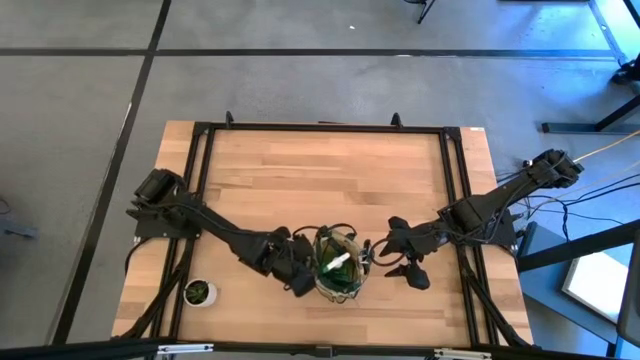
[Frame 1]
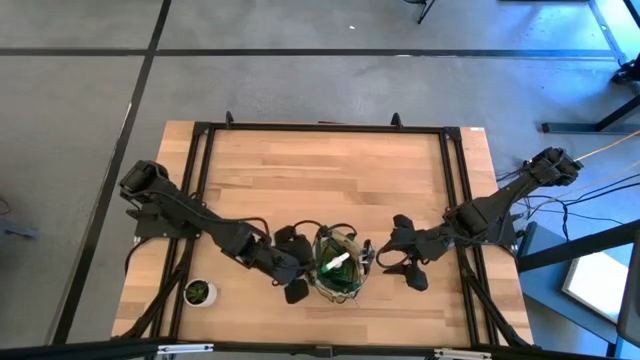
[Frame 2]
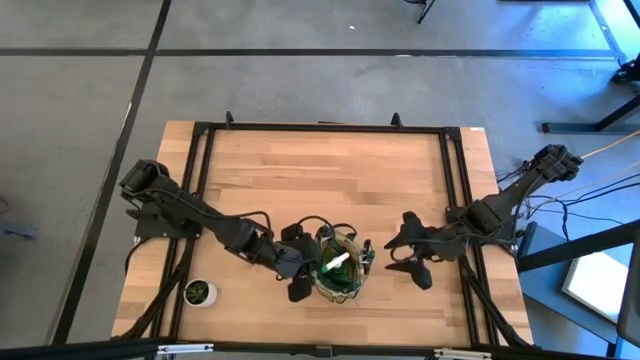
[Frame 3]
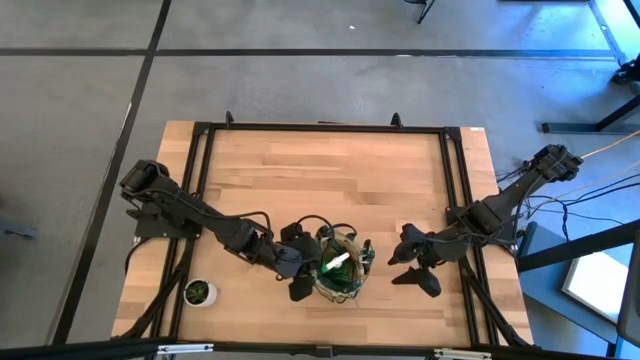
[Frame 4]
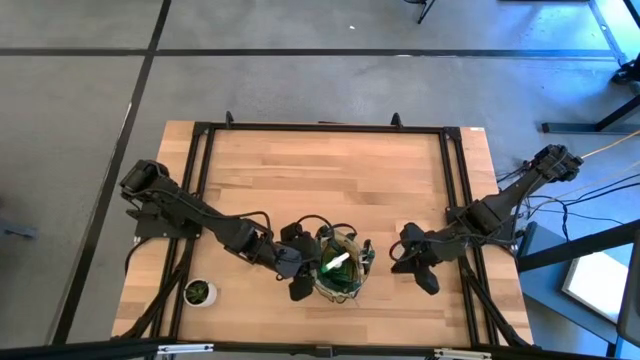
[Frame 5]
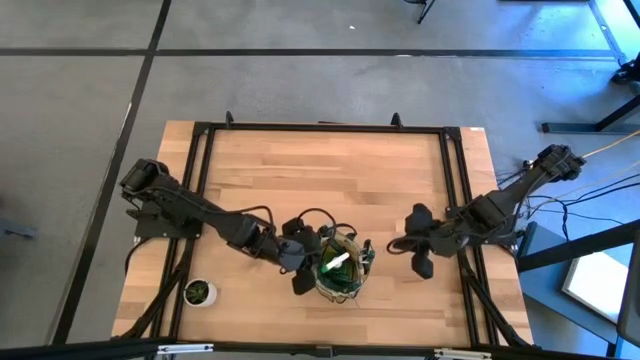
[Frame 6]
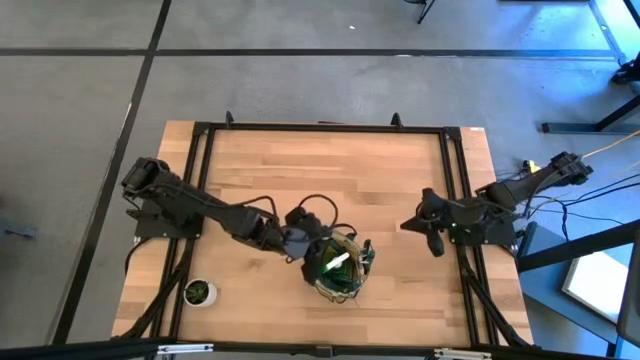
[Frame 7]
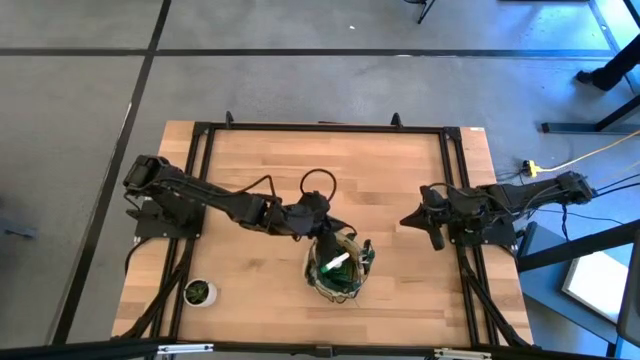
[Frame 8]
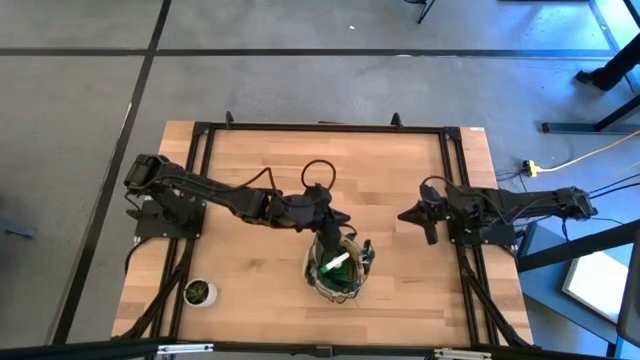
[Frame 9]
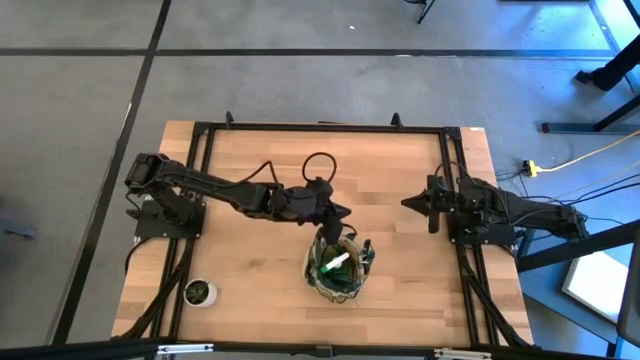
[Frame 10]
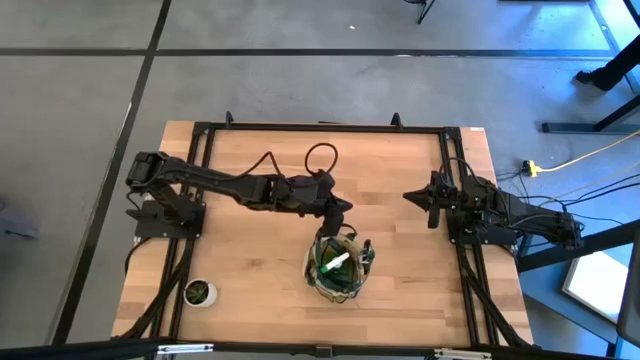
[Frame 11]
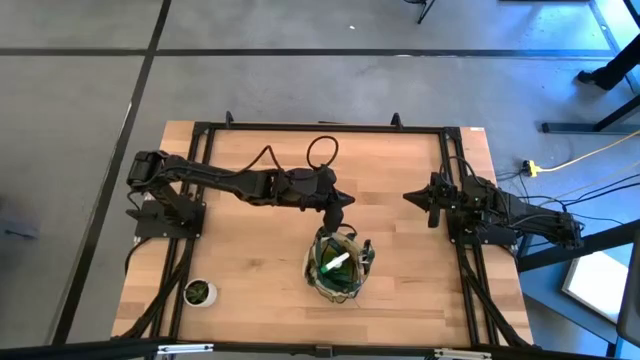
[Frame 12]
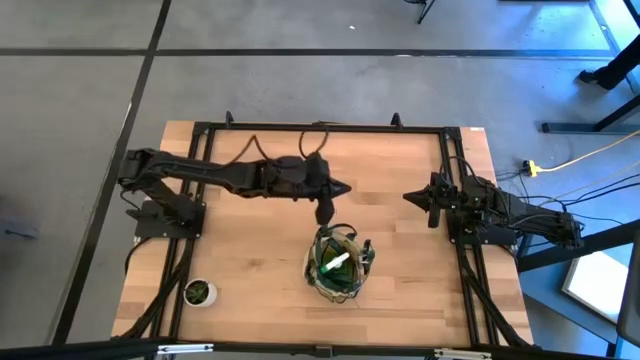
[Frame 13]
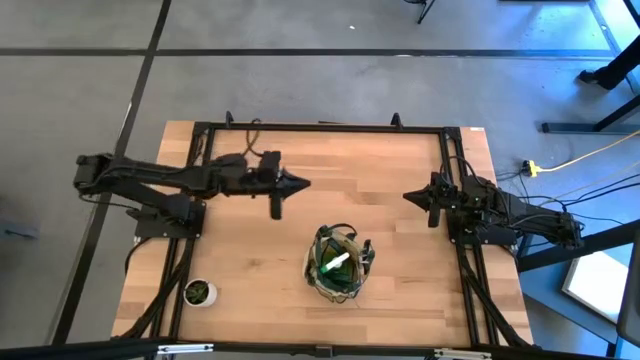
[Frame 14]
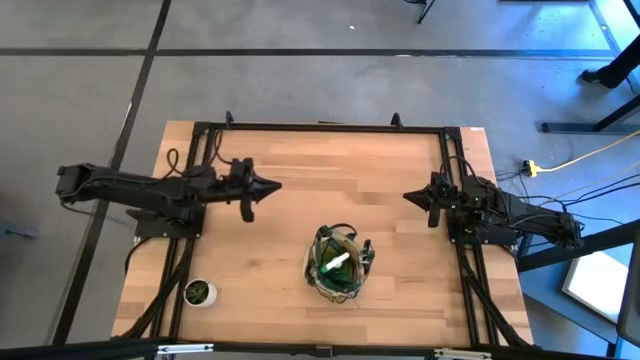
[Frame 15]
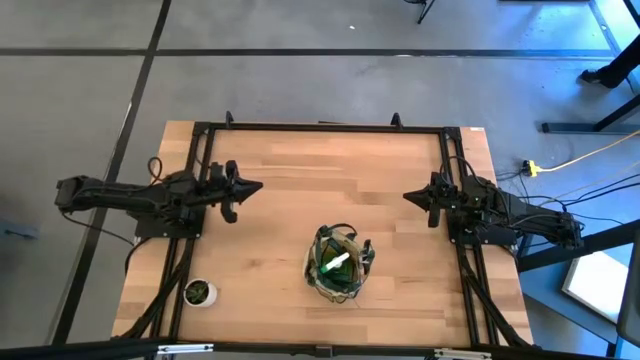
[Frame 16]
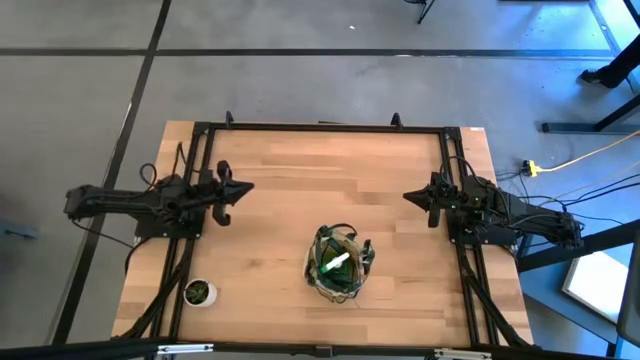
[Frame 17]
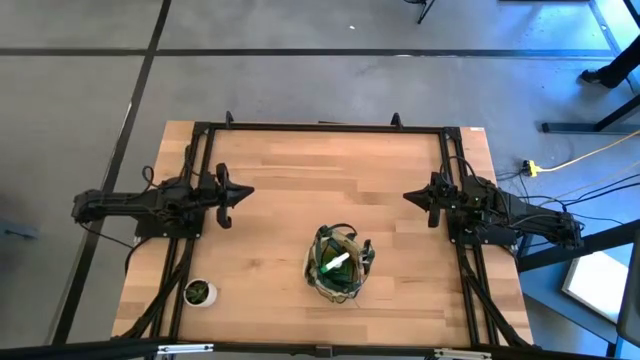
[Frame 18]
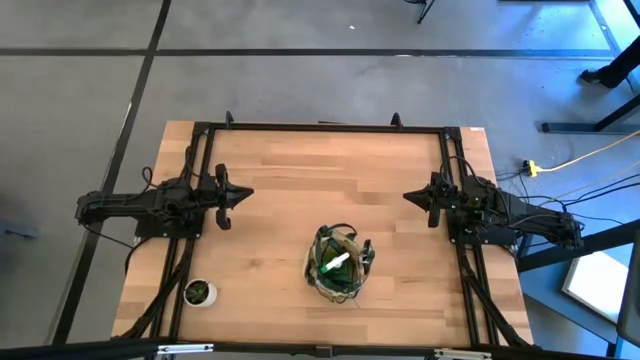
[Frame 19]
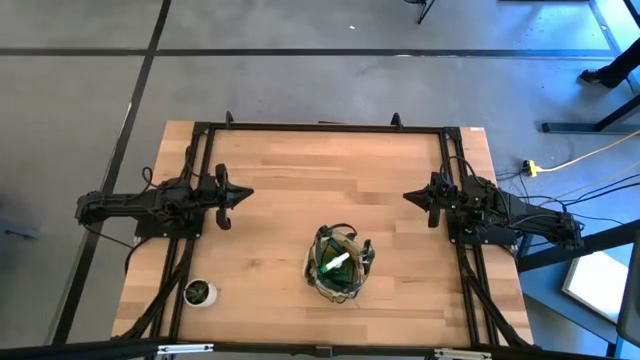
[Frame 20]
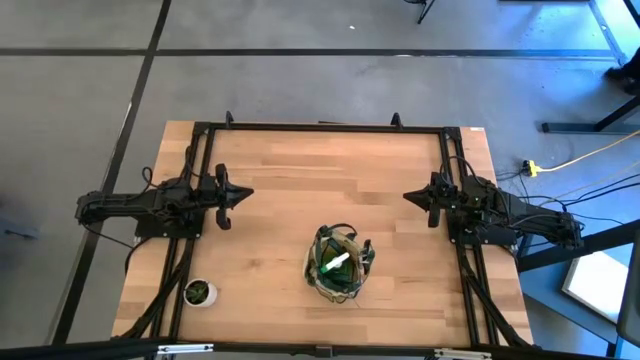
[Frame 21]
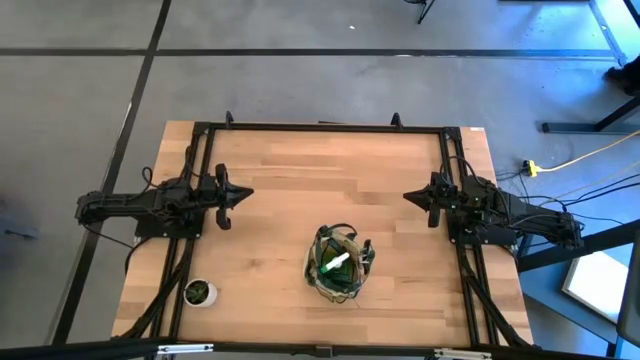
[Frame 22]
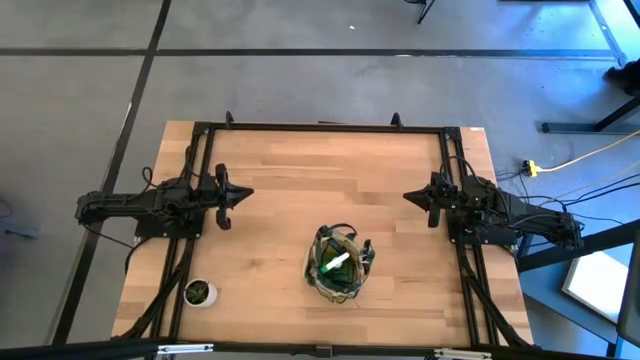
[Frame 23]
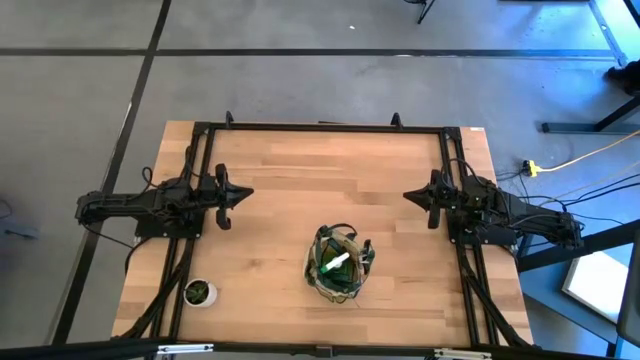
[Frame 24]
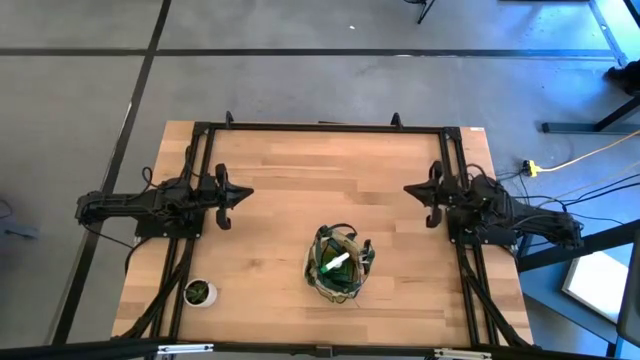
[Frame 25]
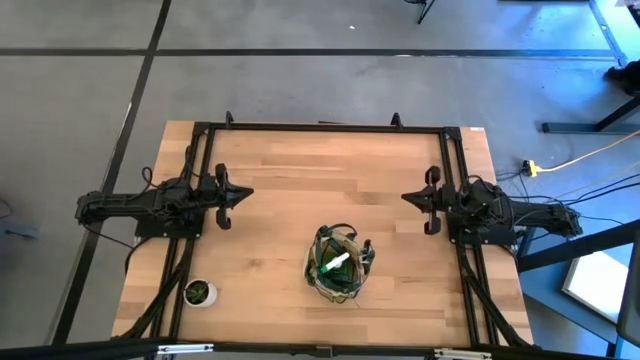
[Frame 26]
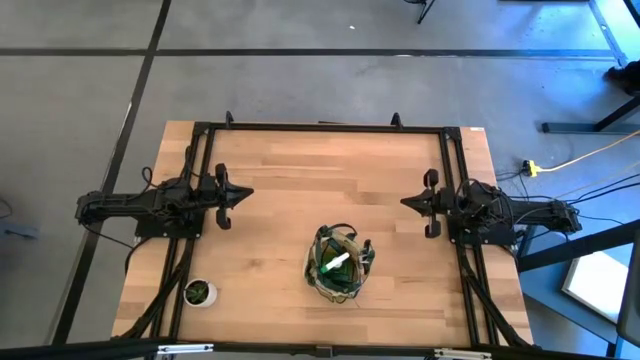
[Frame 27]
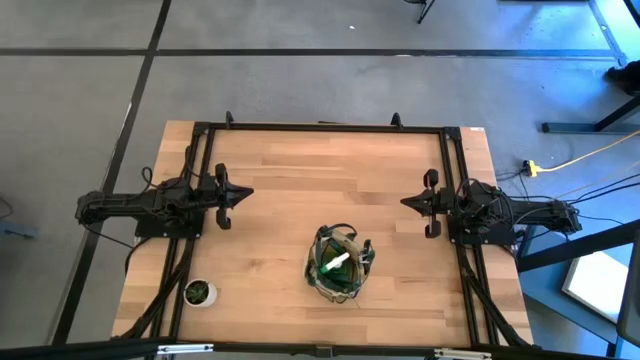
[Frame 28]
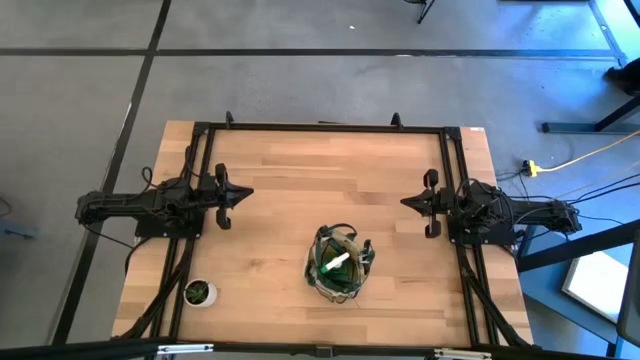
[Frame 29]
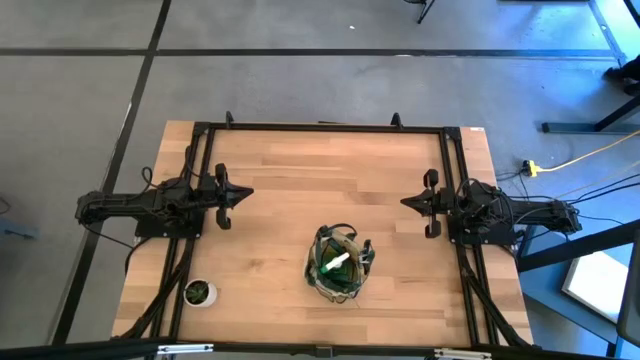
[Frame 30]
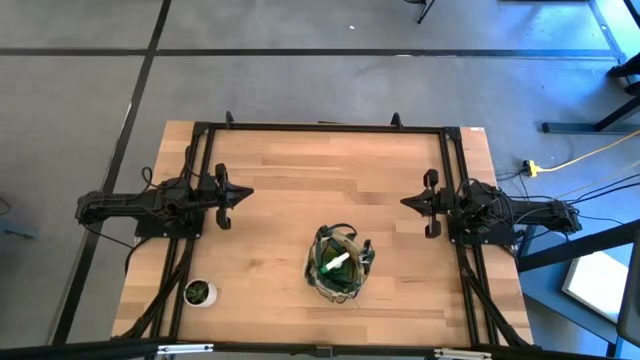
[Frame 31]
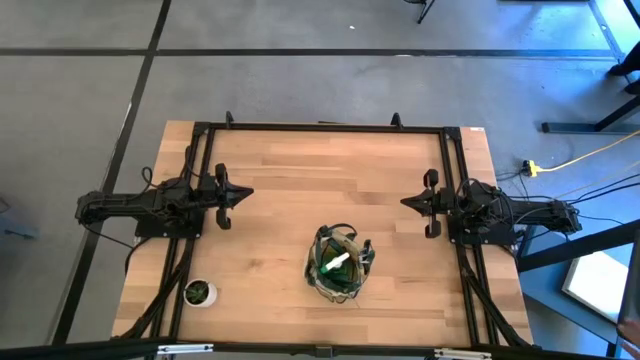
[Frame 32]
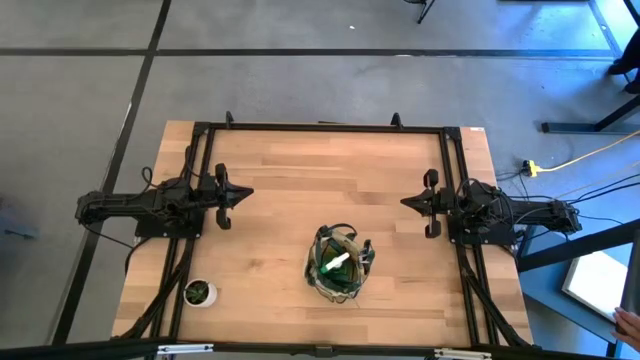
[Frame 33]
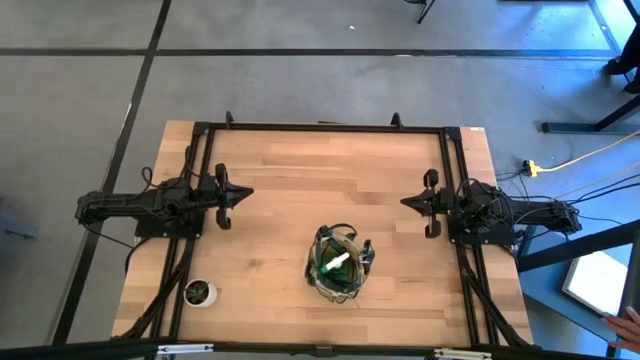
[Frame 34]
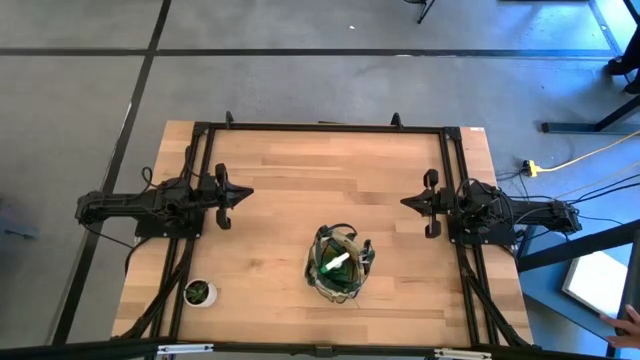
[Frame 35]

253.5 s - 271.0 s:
Task: Pick & Place Garden tools in Gardening bag
Return to Home Position
